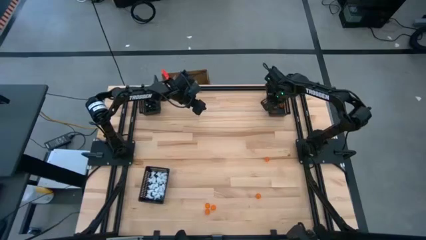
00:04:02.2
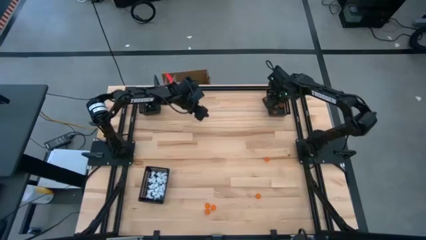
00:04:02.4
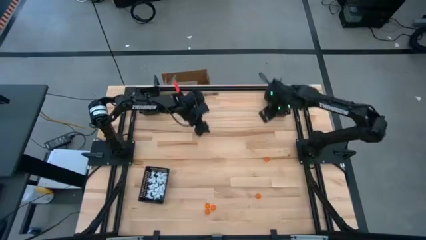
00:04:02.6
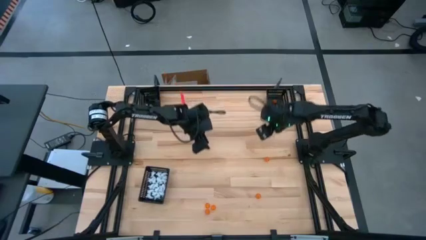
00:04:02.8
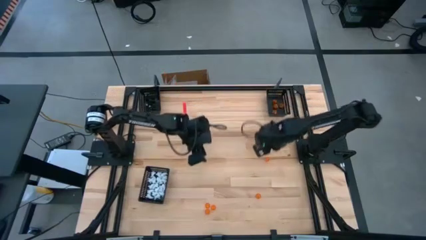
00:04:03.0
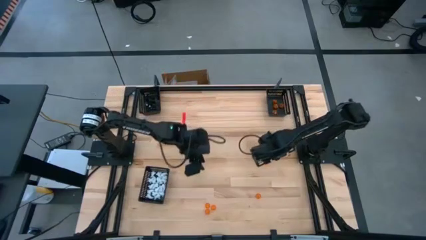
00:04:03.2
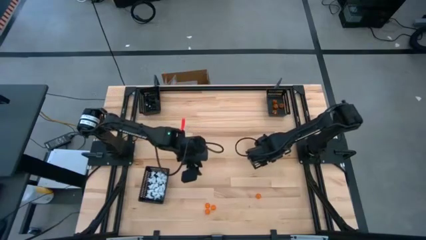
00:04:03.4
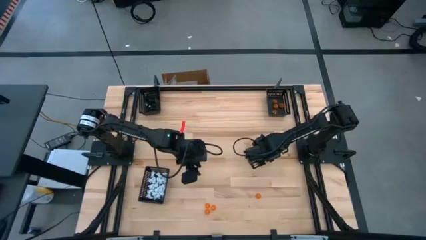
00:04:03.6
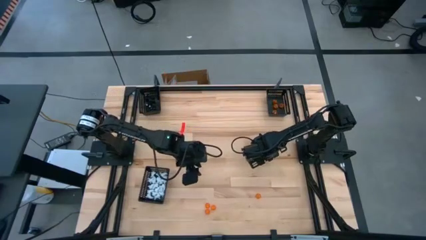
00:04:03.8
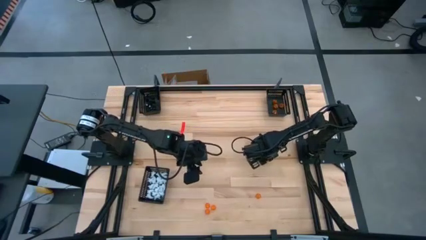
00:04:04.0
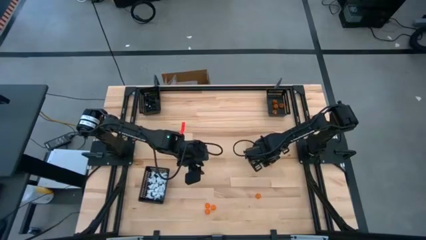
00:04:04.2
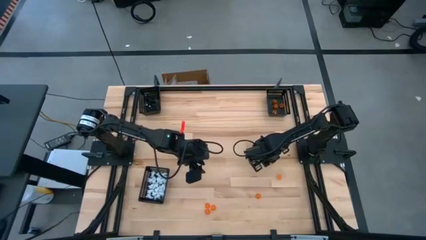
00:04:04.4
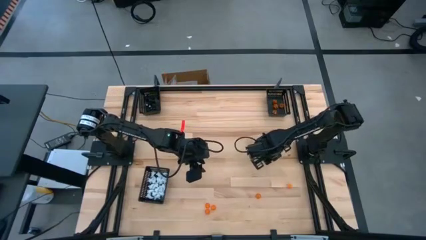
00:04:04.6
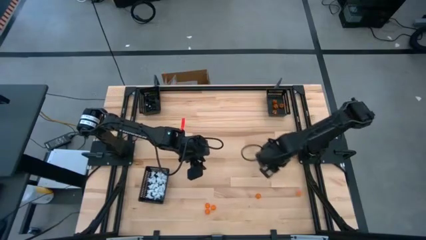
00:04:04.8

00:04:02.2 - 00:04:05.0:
Task: Sort Halloween decoration
Put the orange pumpkin toy into the top right black basket

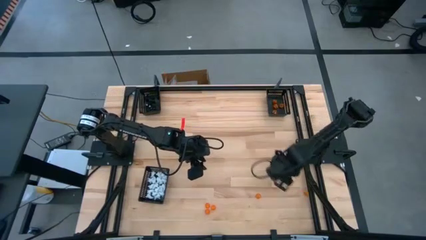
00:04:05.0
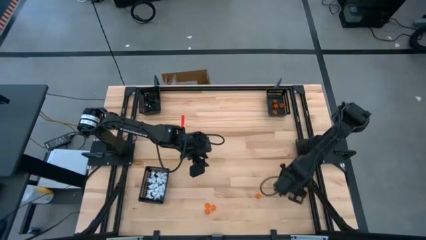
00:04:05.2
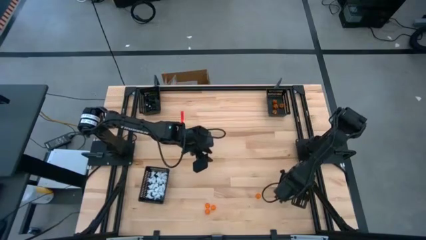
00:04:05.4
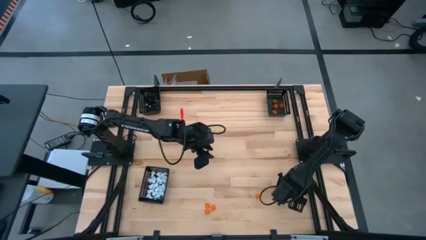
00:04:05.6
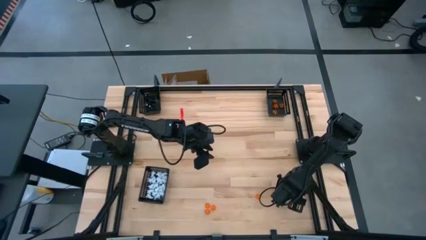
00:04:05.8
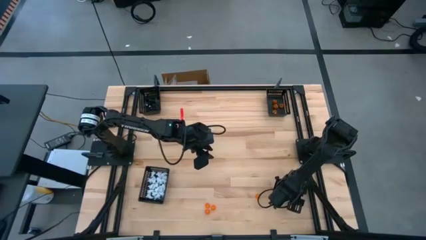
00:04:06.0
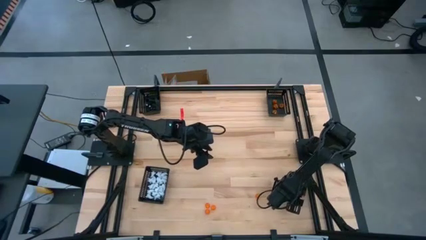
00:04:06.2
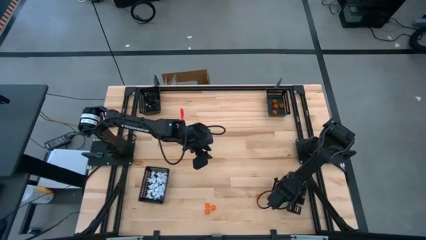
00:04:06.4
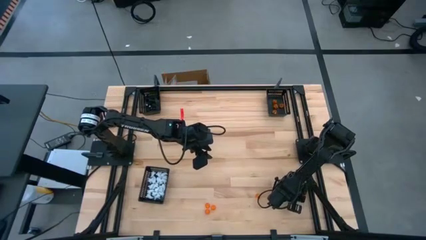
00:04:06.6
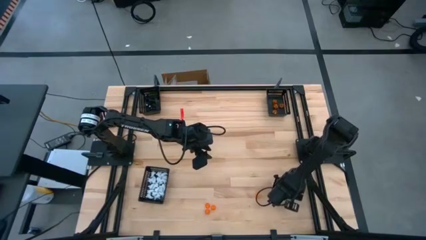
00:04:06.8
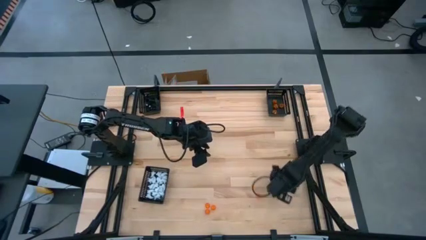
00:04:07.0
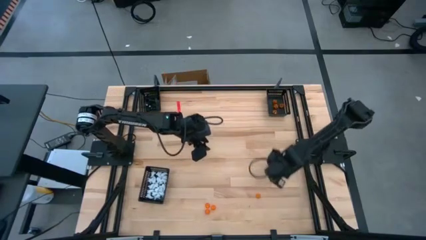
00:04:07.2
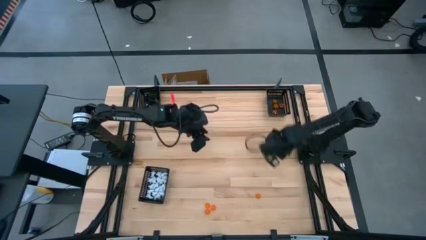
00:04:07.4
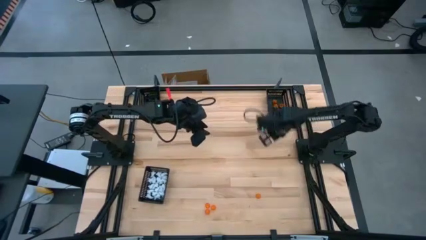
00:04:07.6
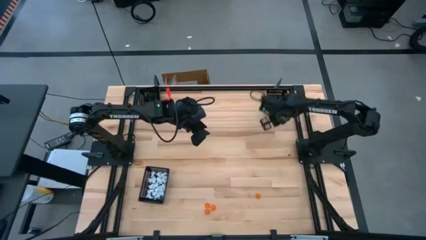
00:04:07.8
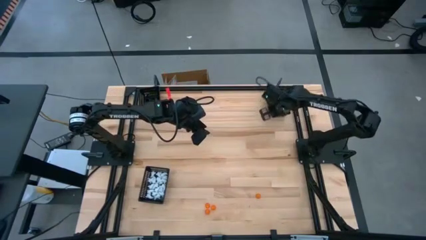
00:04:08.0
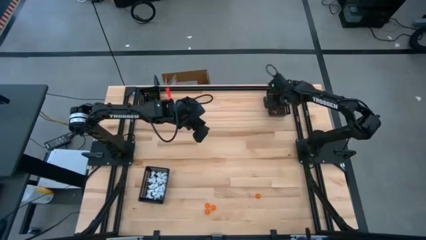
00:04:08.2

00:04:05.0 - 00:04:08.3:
Put the orange pumpkin toy into the top right black basket

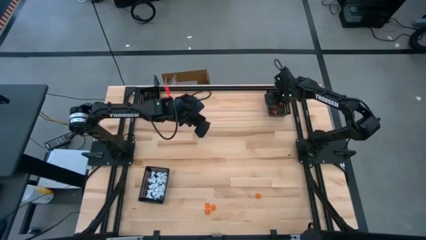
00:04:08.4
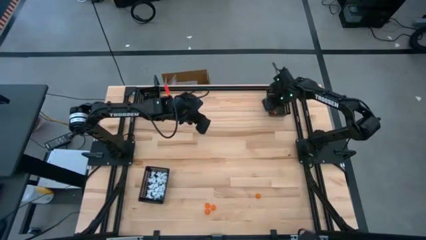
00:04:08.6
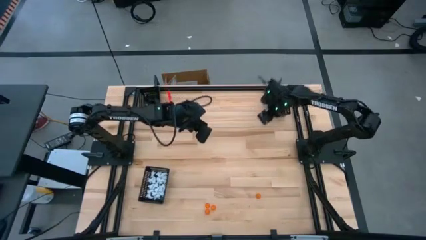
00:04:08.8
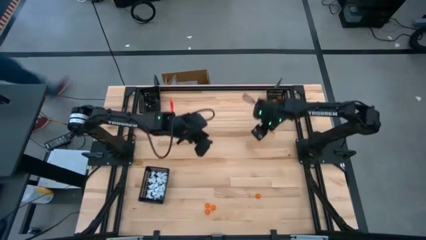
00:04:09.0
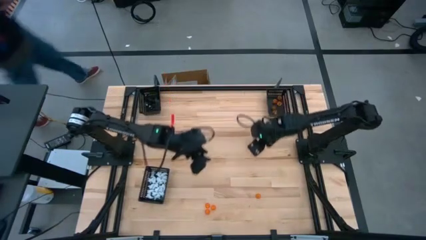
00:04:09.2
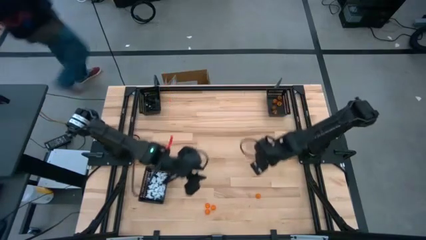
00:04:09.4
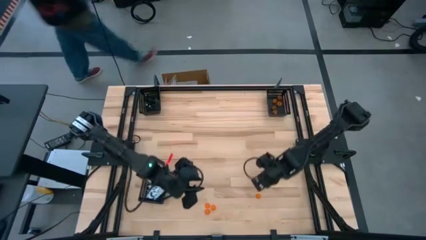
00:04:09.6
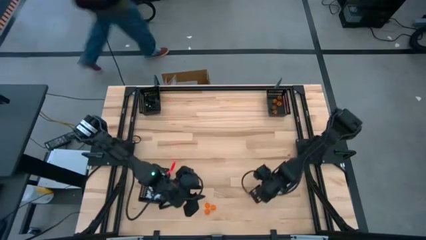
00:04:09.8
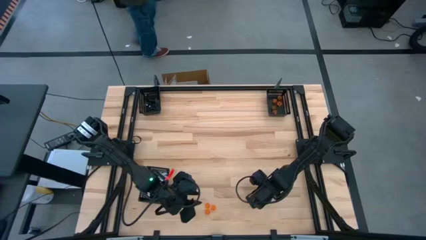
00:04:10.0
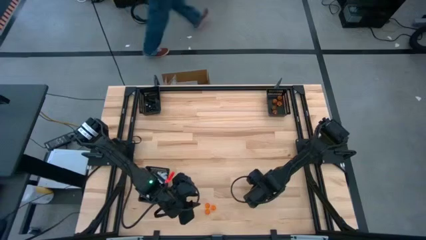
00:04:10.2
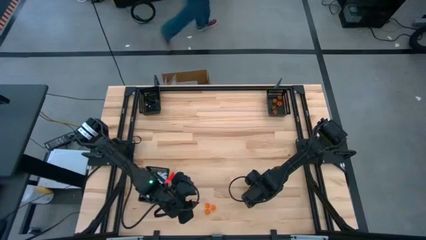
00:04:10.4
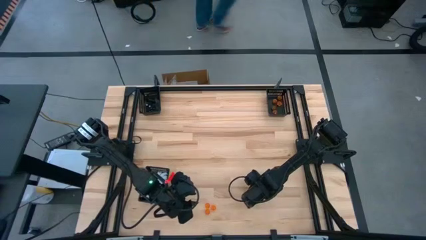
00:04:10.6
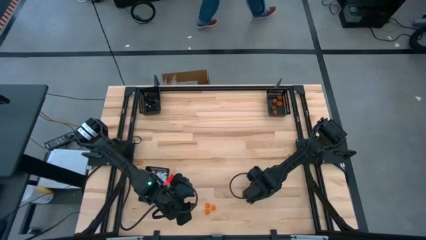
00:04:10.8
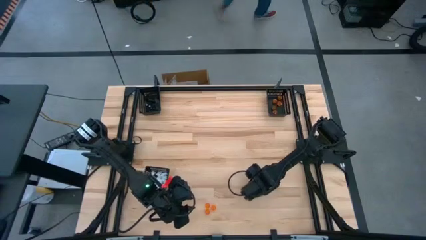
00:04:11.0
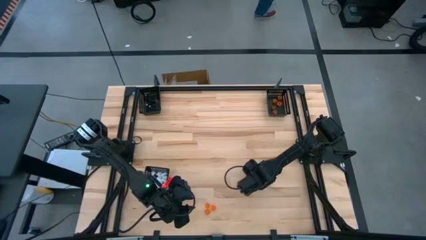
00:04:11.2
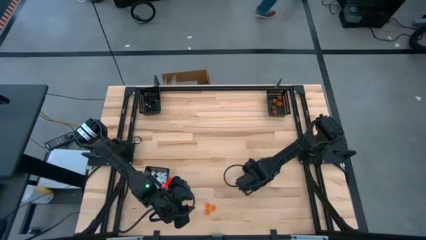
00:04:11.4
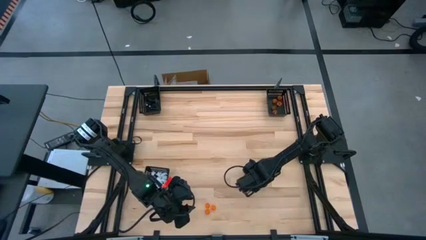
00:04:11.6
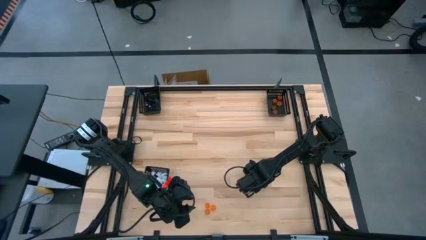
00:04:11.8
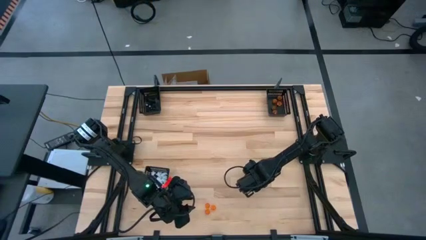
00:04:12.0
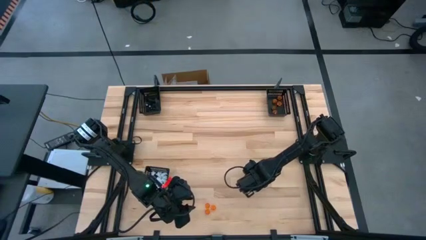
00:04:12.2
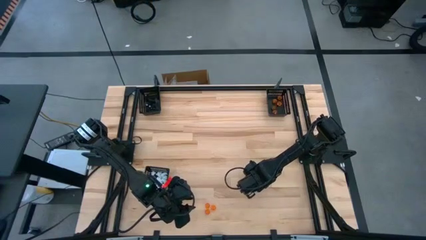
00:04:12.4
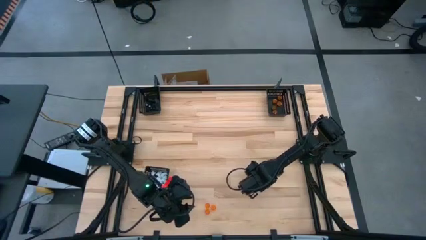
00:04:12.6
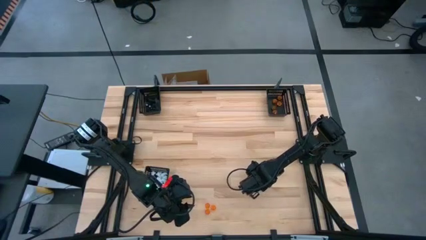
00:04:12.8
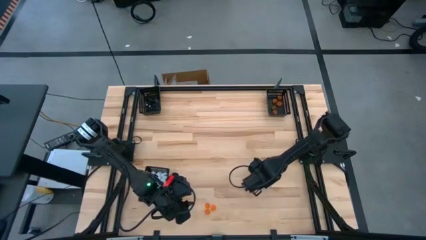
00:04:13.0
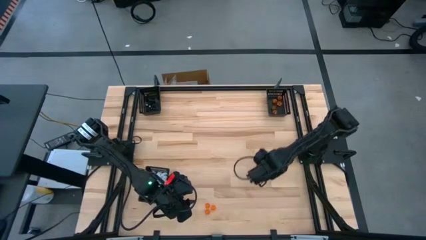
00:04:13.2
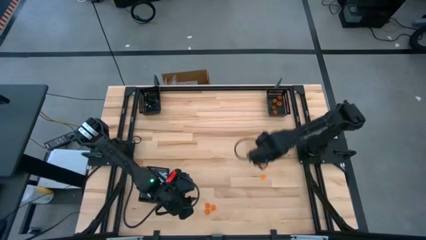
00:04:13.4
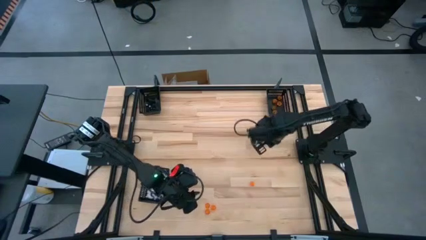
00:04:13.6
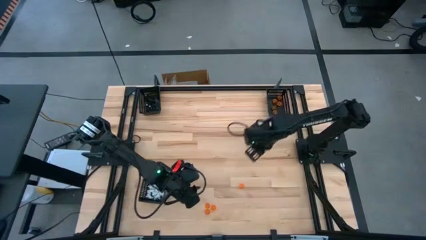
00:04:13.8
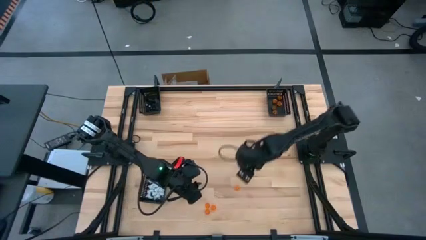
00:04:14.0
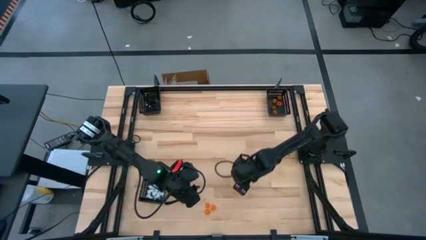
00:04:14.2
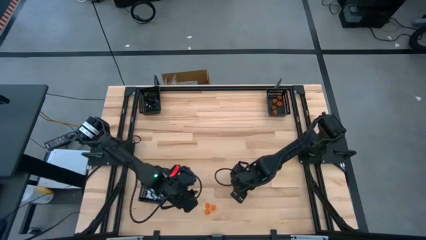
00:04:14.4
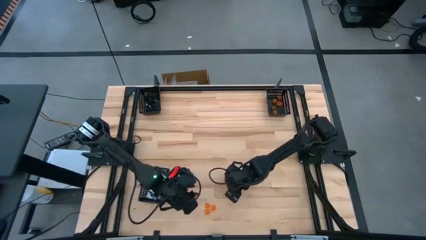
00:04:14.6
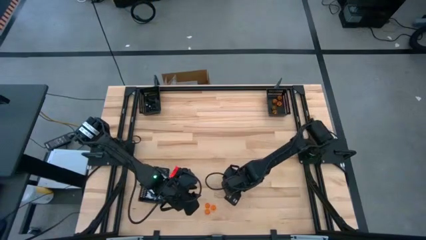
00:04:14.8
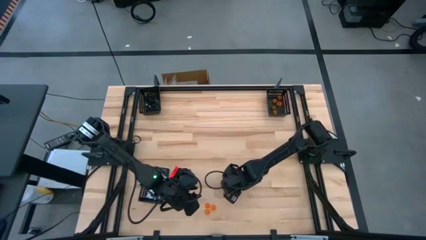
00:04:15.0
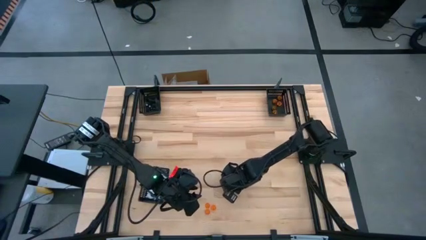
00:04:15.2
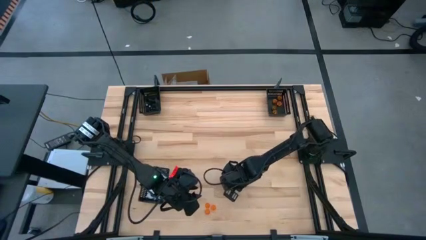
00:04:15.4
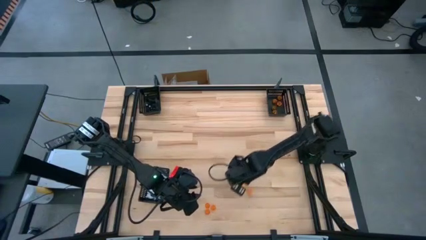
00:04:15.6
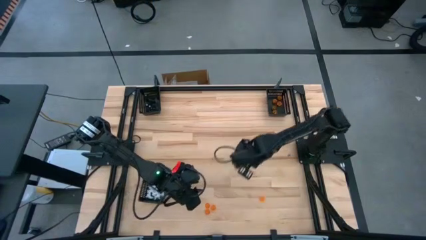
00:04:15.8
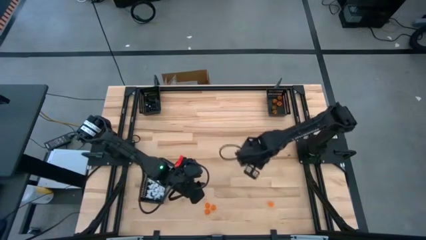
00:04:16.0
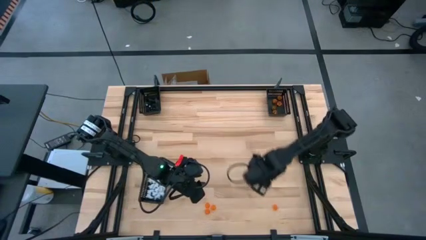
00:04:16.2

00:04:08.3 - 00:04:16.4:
Put the orange pumpkin toy into the top right black basket

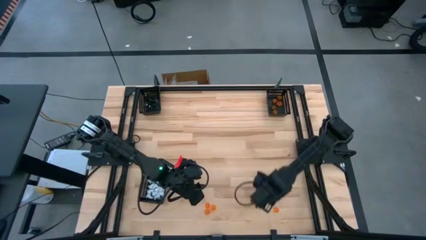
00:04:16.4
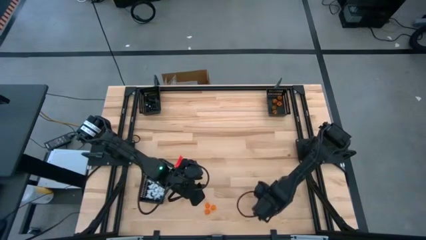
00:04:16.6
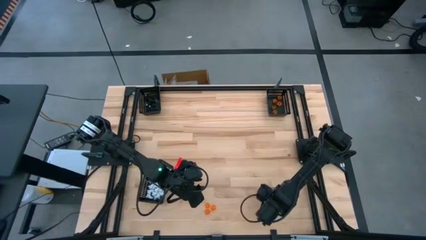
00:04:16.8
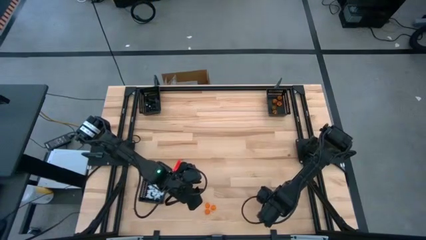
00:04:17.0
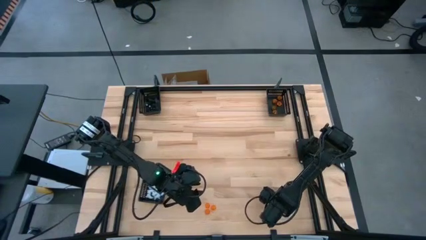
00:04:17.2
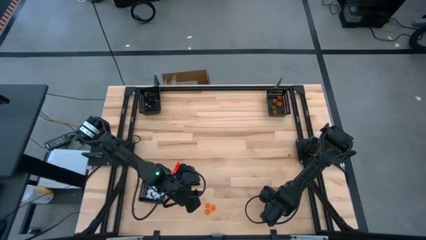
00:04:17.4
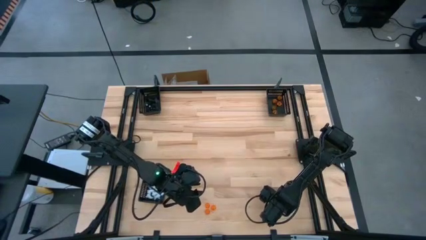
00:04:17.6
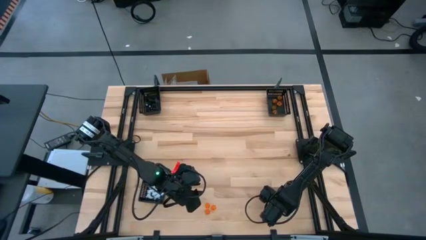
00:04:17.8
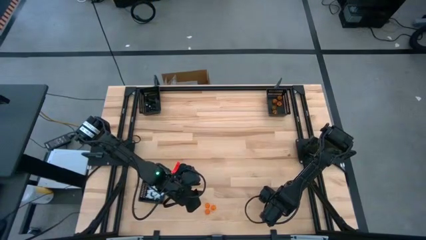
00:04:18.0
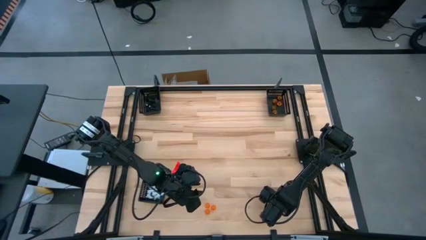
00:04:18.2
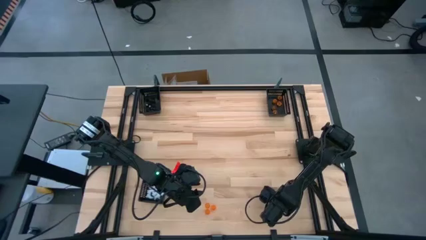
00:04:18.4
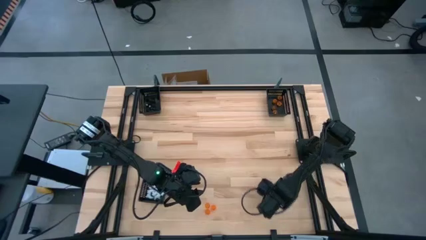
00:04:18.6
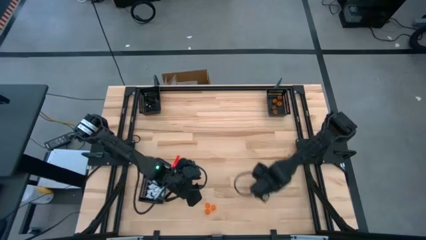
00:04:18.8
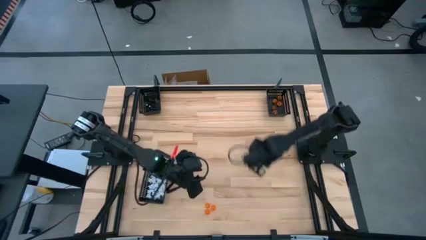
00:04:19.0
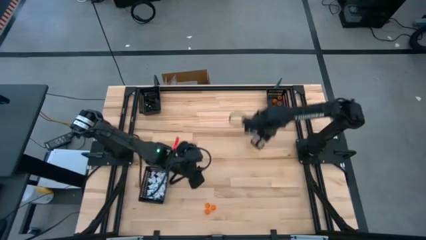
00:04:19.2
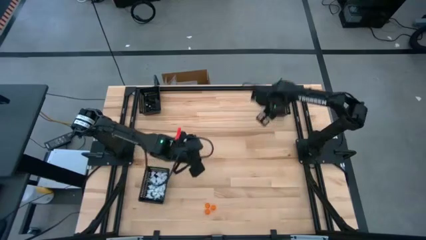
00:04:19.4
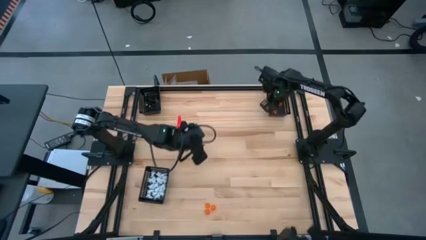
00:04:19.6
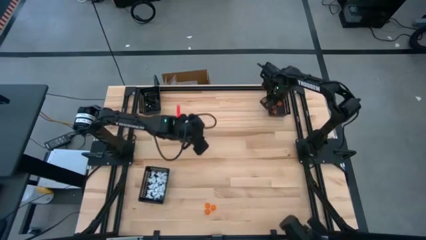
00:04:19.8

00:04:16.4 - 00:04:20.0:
Put the orange pumpkin toy into the top right black basket
